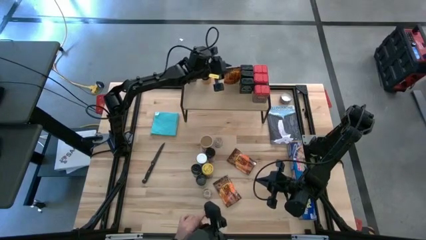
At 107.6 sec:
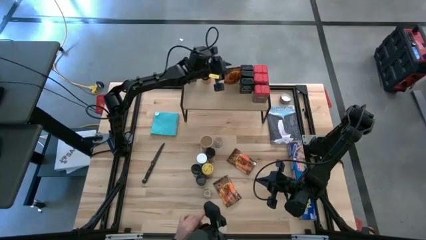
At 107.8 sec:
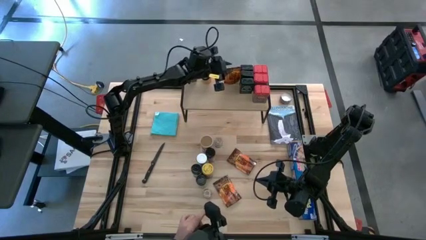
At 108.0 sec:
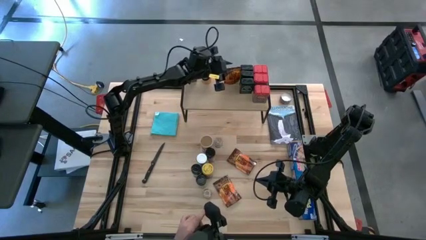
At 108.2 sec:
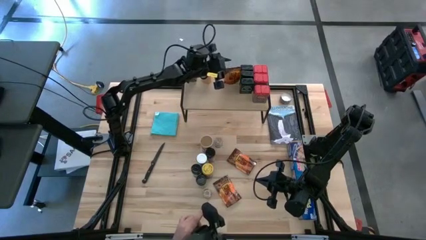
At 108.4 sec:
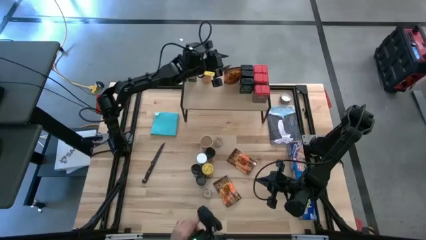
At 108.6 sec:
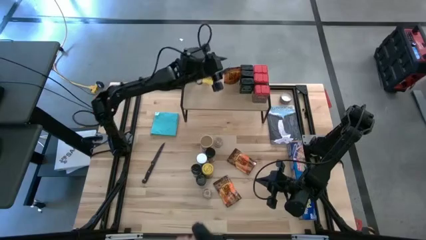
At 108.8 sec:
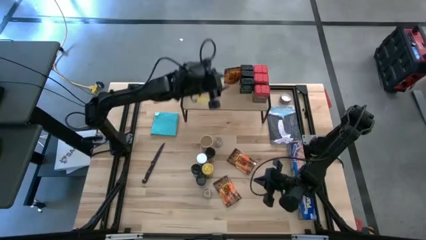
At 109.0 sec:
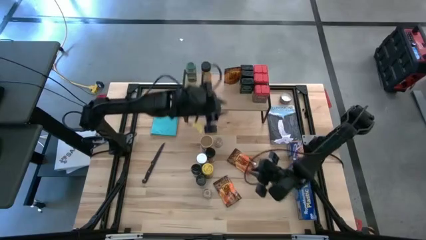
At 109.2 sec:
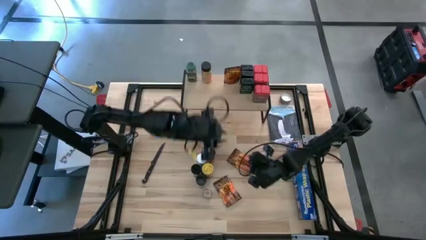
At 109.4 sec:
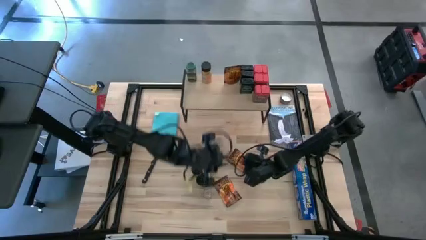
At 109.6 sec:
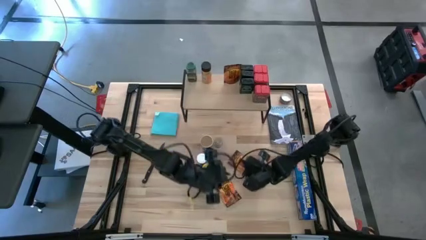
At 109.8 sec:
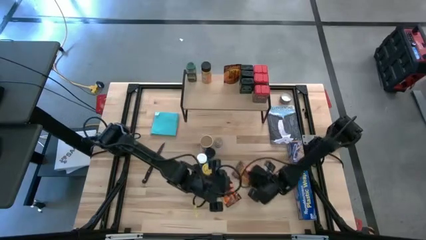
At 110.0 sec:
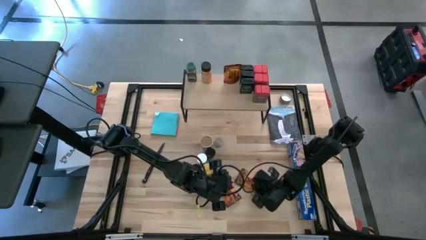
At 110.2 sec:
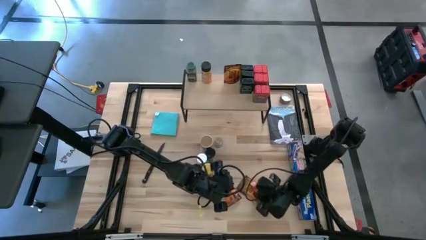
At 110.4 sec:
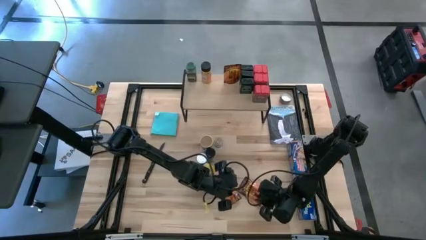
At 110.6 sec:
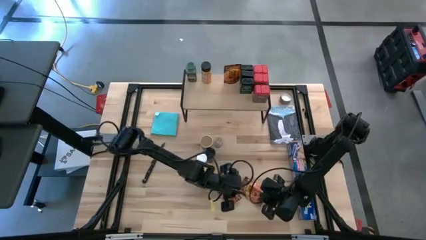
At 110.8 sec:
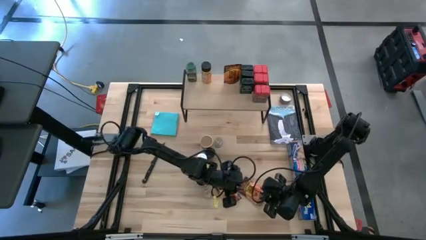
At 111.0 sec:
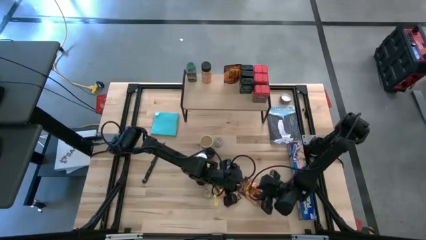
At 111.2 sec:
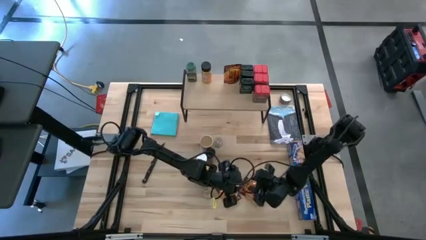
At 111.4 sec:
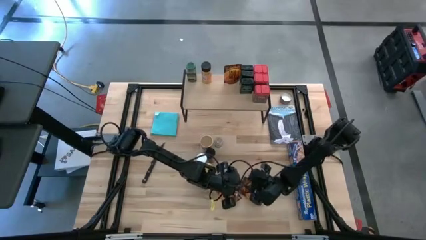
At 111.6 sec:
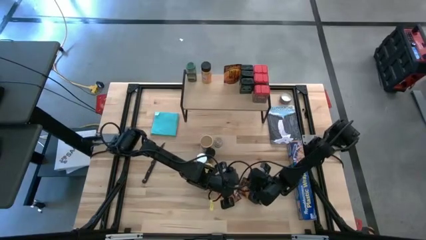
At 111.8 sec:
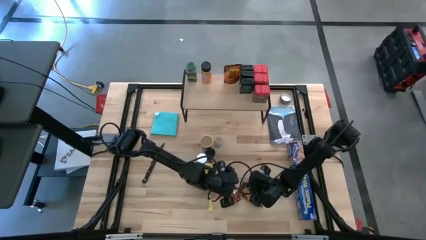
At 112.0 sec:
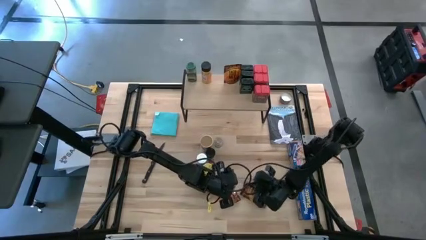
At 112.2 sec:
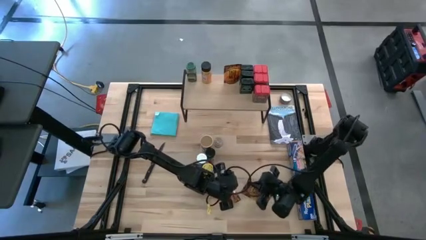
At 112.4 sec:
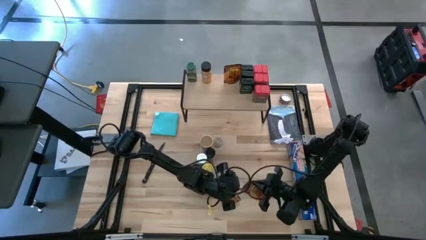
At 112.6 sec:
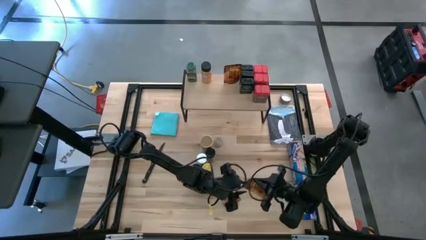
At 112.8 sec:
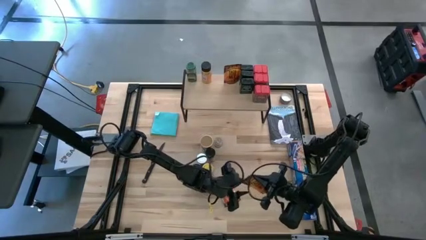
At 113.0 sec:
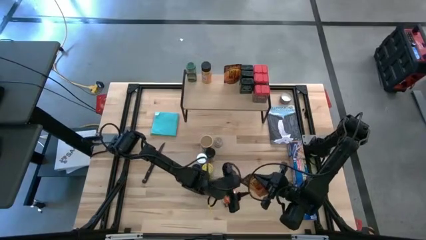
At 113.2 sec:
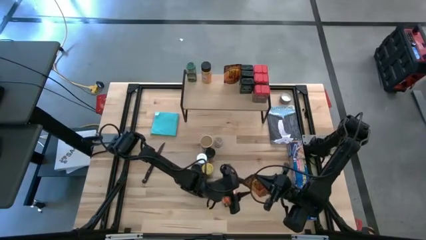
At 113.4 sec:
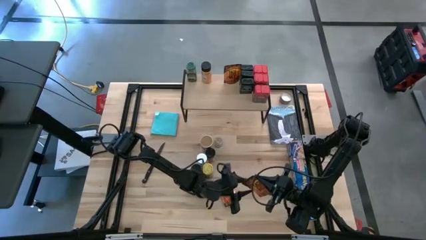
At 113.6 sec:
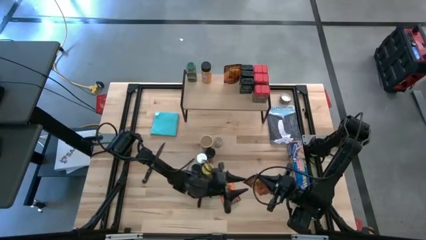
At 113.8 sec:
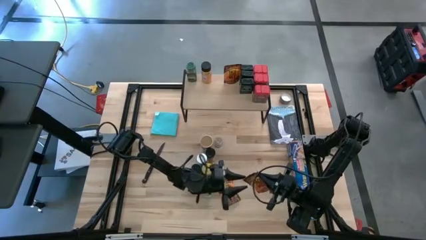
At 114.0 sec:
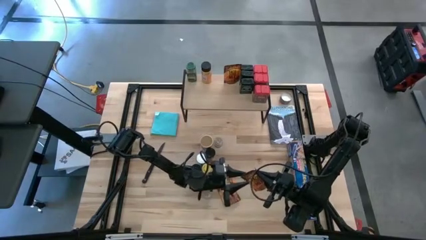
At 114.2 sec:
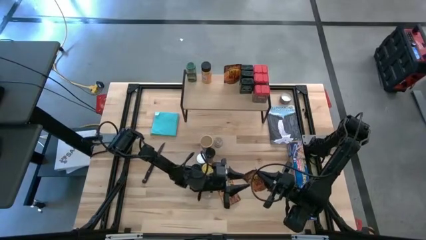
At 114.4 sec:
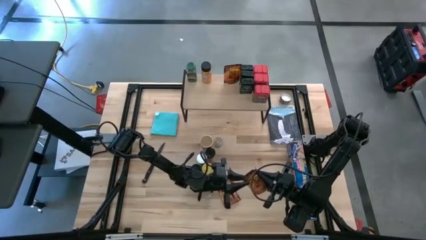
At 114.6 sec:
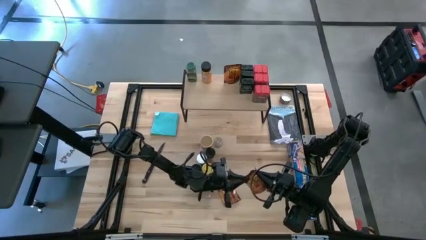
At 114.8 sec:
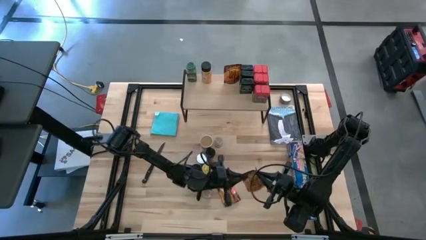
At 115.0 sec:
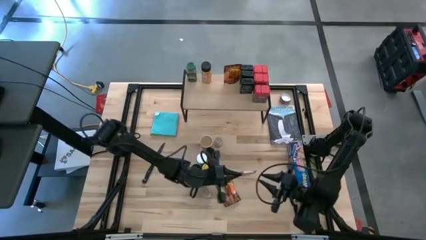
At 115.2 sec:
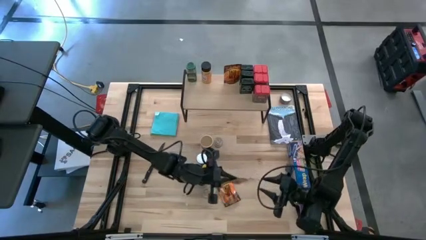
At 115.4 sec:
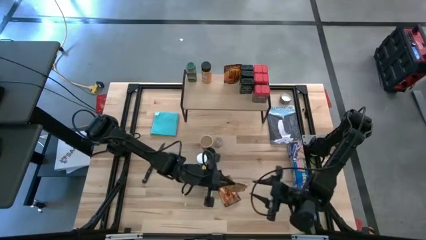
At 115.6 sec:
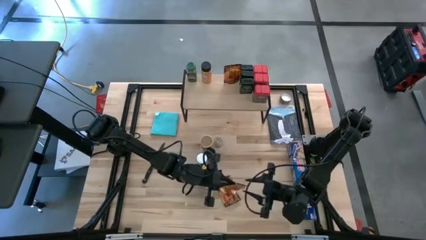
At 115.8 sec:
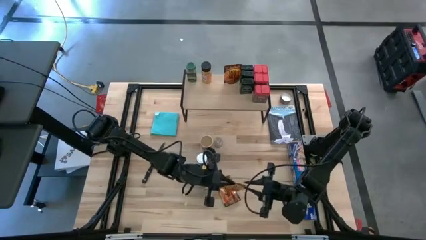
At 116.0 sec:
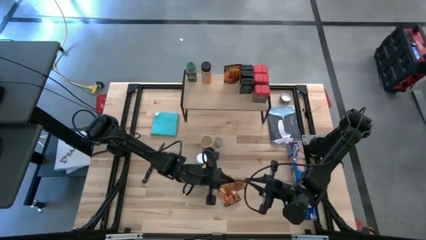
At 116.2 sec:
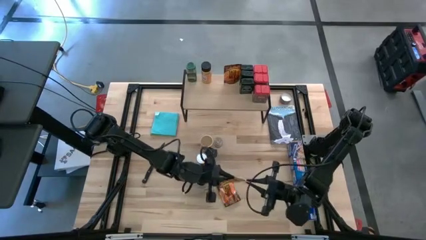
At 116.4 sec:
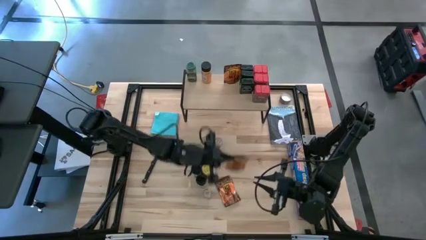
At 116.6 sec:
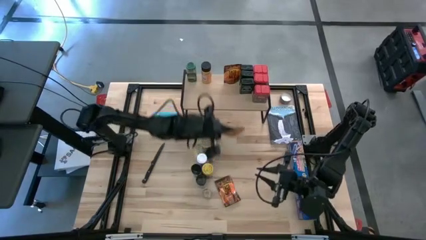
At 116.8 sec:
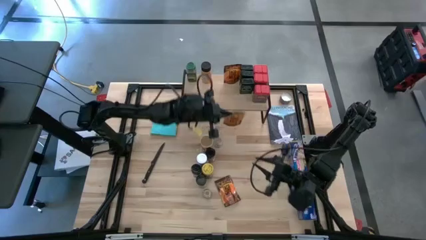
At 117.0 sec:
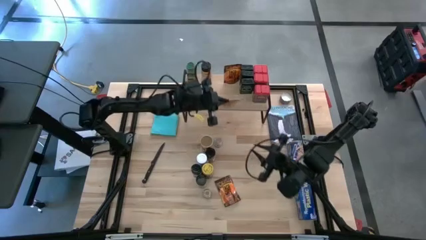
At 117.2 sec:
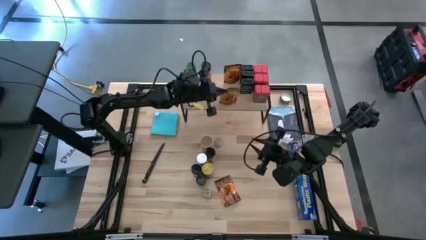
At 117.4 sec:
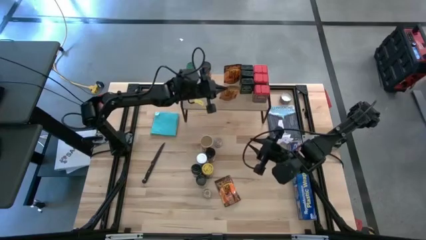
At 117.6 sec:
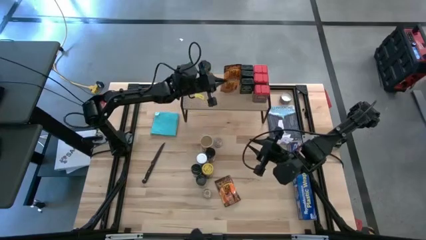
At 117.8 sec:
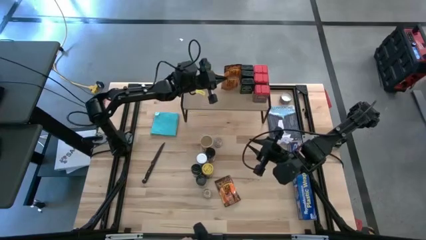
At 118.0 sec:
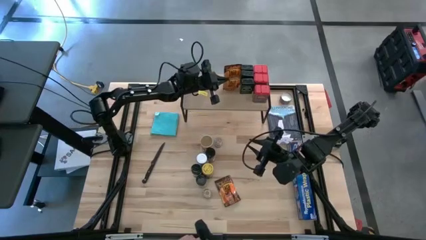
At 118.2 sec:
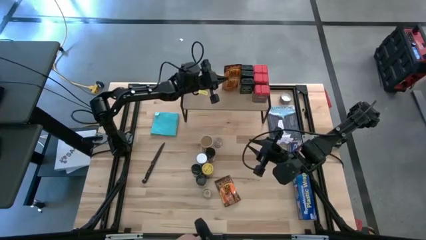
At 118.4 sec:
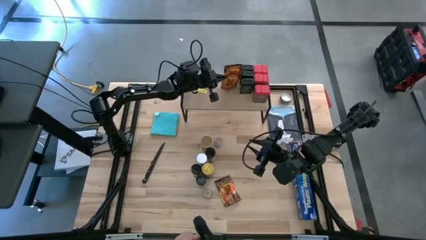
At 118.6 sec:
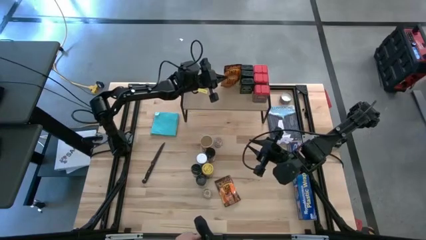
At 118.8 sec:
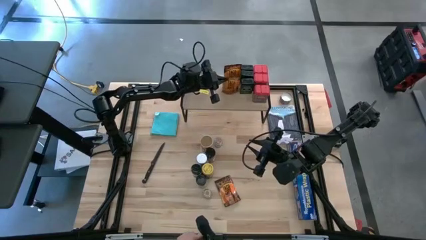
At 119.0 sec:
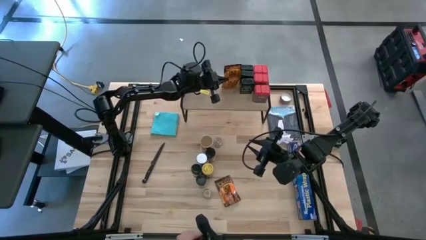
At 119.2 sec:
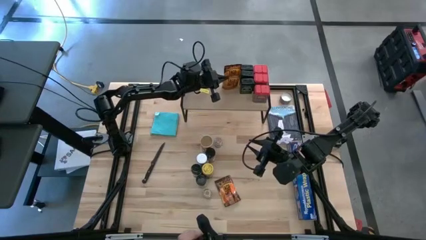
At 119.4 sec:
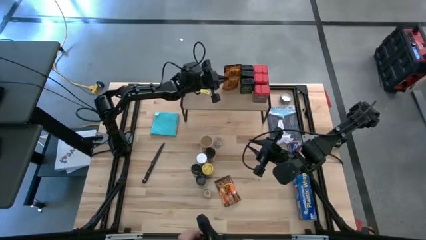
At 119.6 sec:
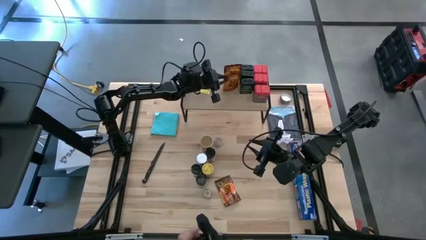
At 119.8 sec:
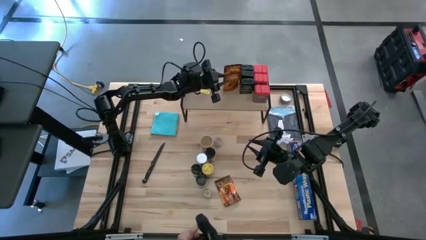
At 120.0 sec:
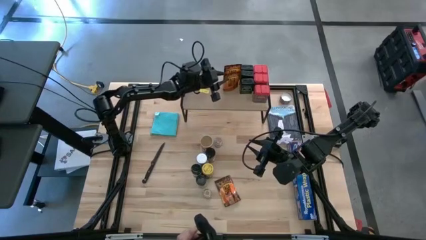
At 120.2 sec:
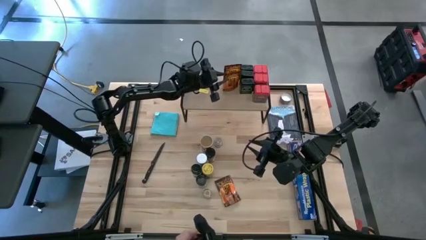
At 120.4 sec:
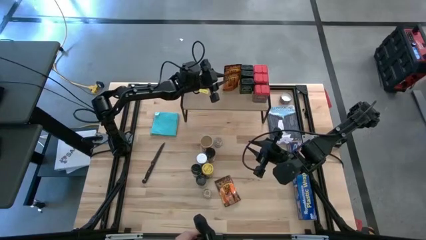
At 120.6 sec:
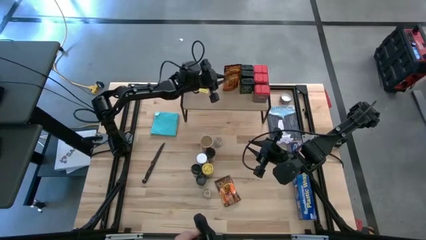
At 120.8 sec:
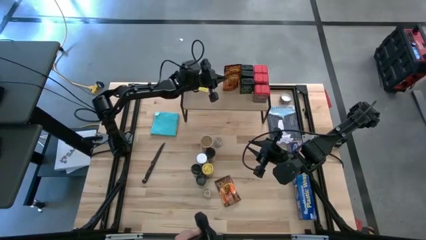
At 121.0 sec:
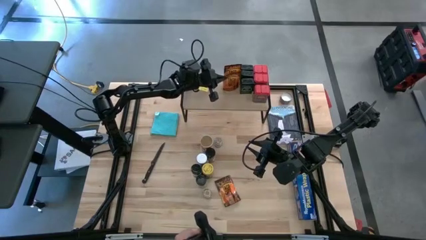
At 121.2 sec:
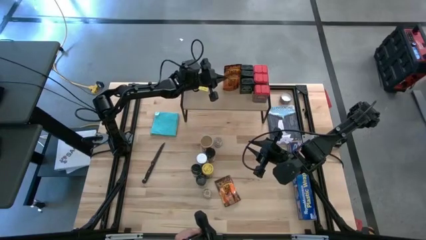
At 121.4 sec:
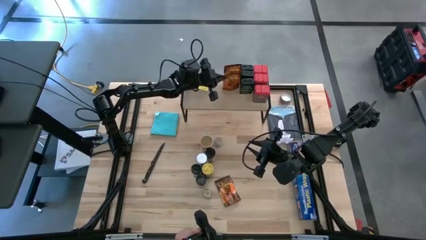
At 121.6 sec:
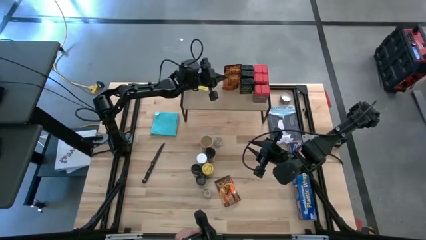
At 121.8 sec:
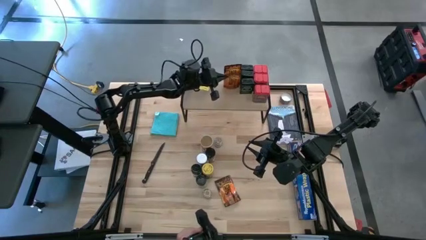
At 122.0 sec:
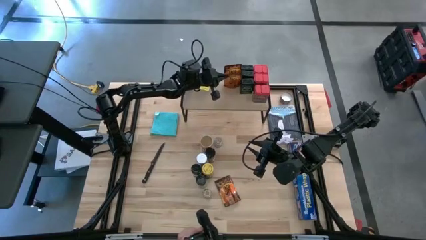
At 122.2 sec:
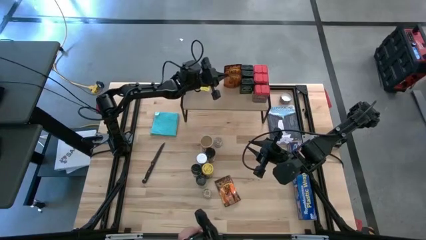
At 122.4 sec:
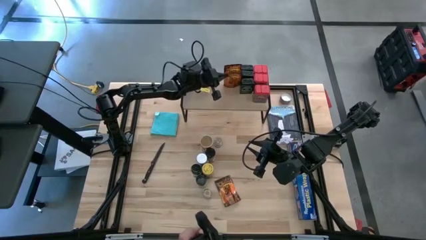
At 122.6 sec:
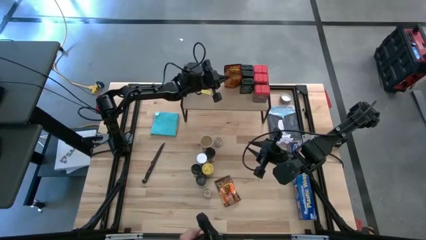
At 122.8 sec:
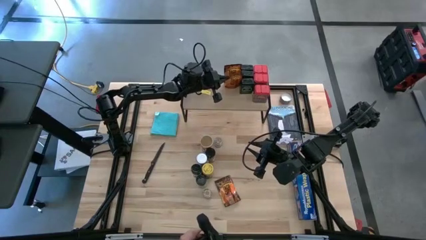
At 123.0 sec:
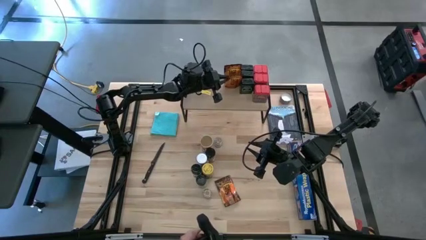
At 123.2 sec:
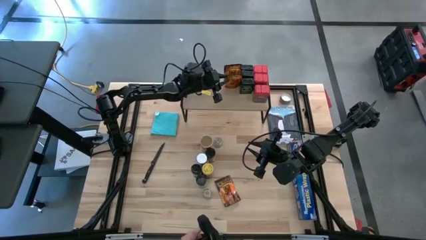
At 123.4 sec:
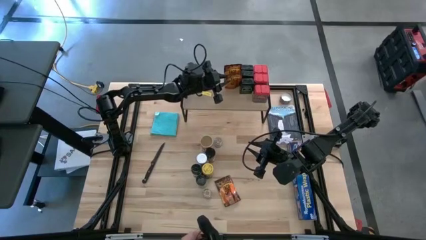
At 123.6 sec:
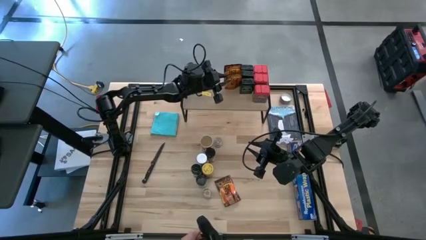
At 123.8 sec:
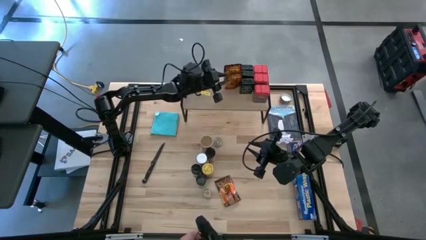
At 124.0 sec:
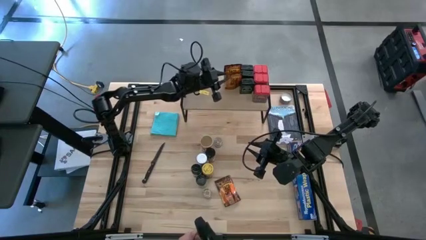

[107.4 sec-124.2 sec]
Task: Shelf spices
Put the orange seasoning pack on the shelf
